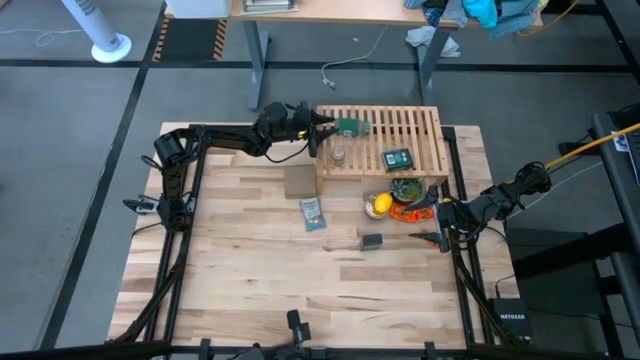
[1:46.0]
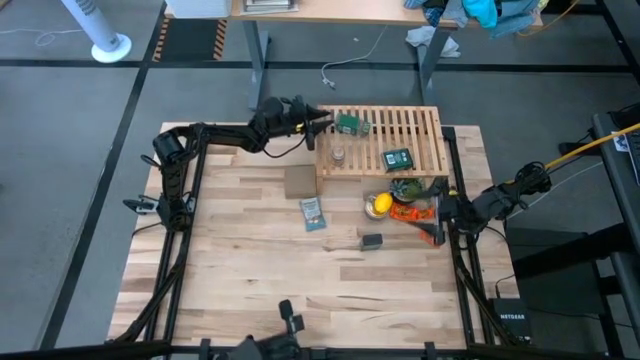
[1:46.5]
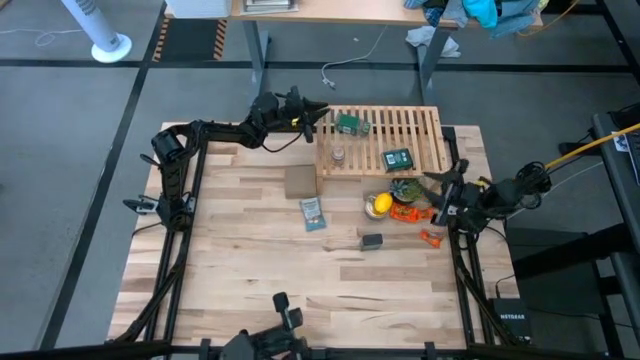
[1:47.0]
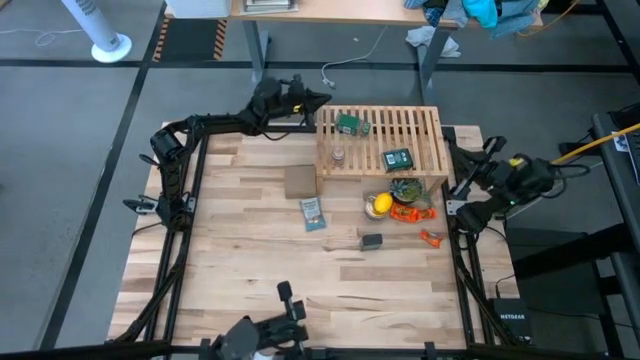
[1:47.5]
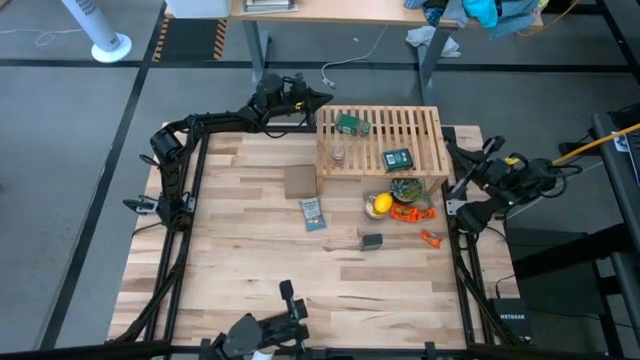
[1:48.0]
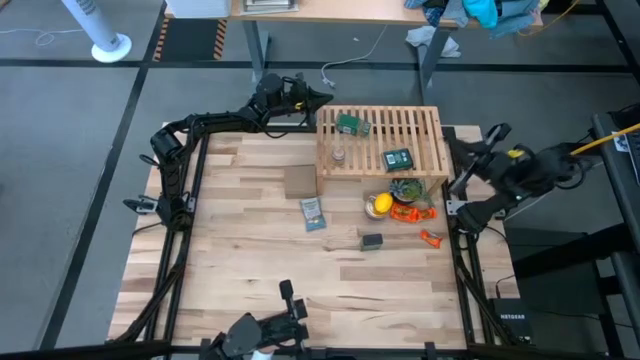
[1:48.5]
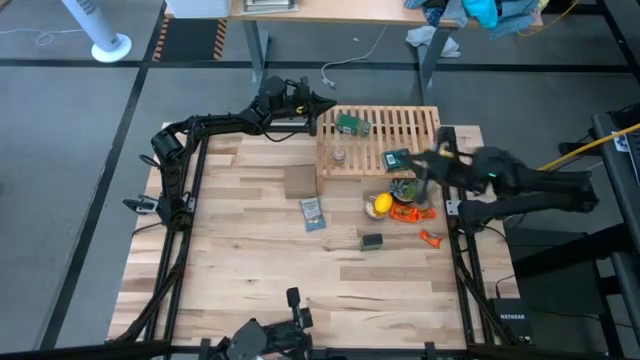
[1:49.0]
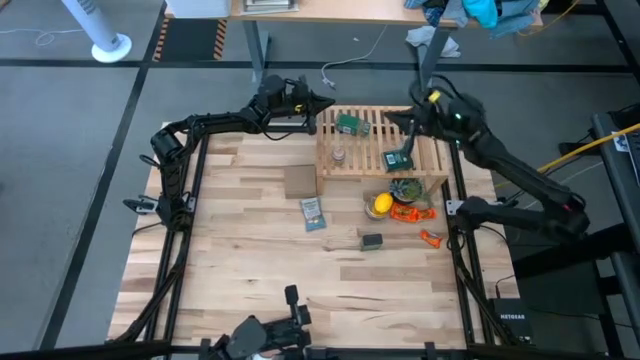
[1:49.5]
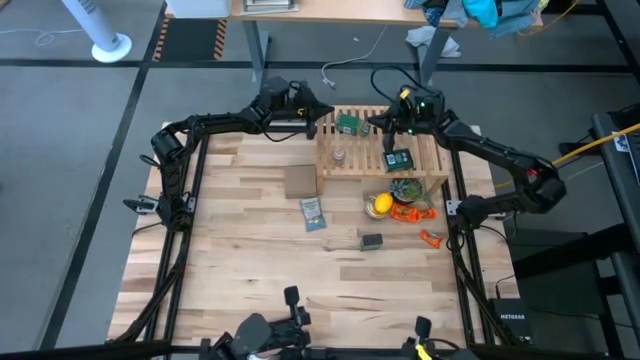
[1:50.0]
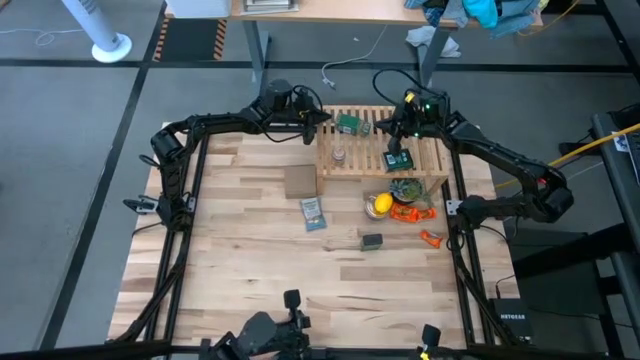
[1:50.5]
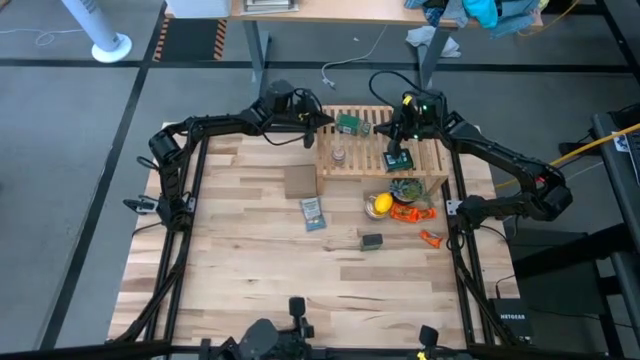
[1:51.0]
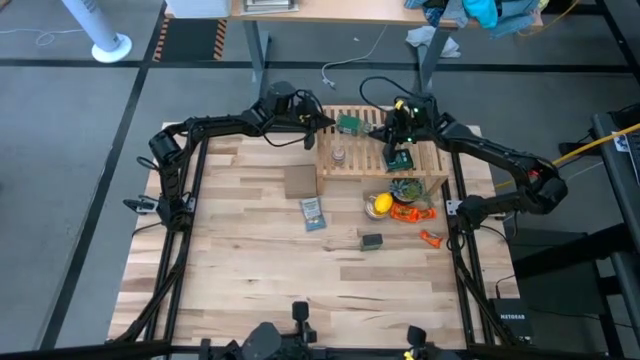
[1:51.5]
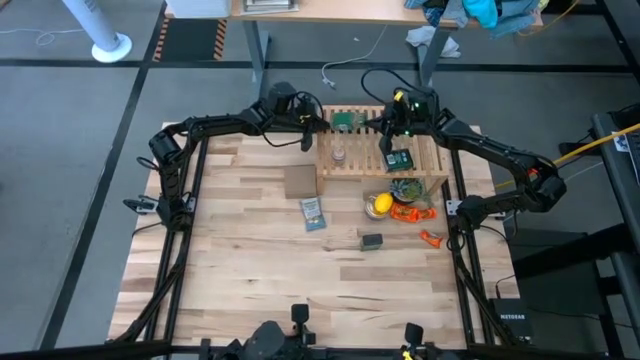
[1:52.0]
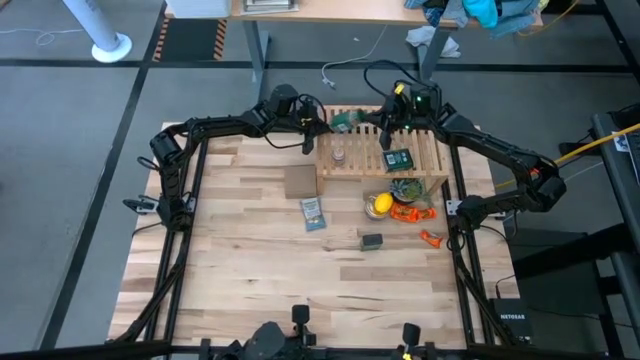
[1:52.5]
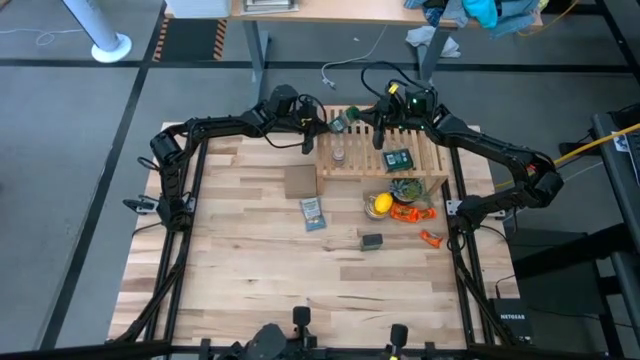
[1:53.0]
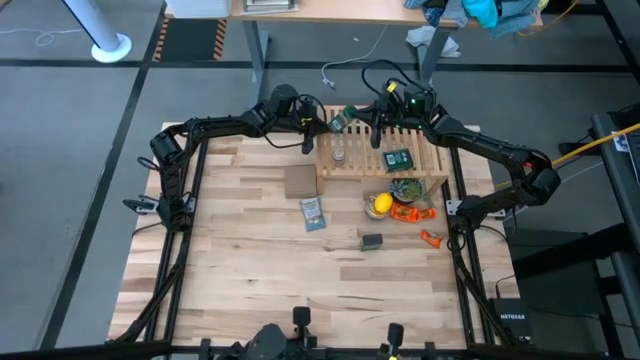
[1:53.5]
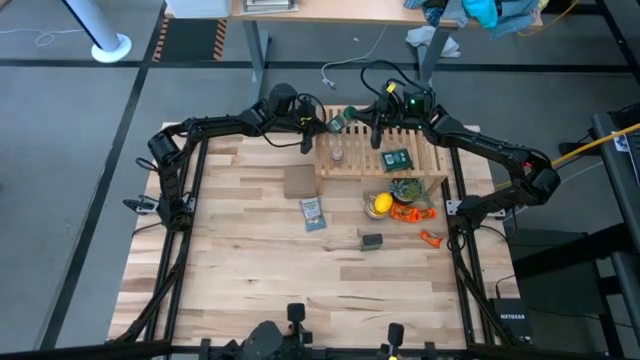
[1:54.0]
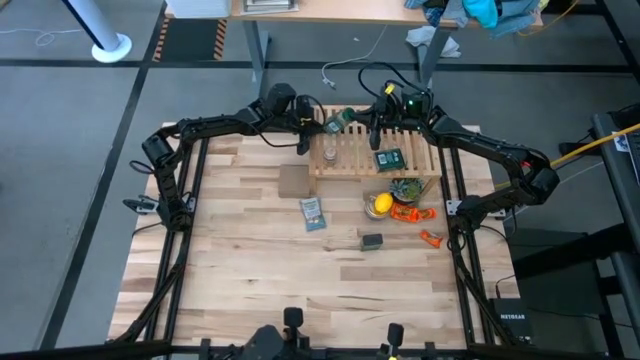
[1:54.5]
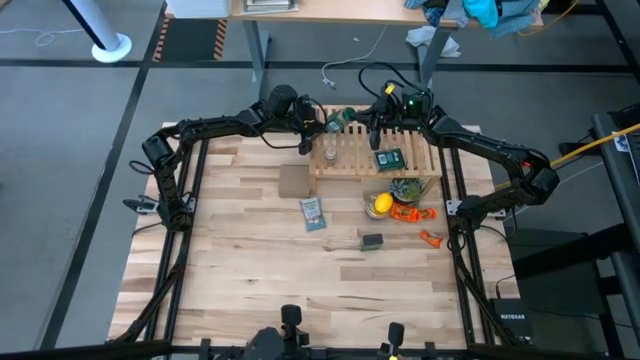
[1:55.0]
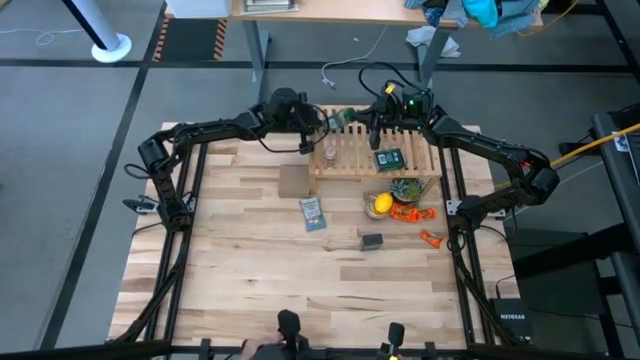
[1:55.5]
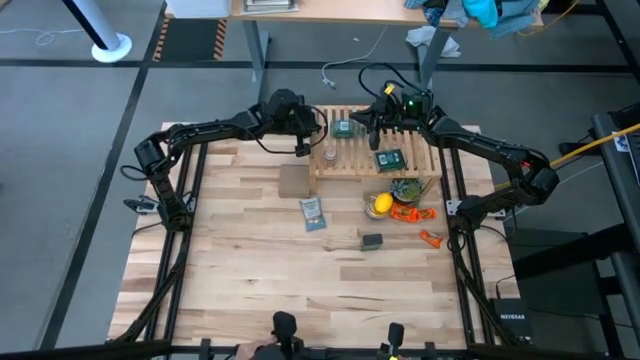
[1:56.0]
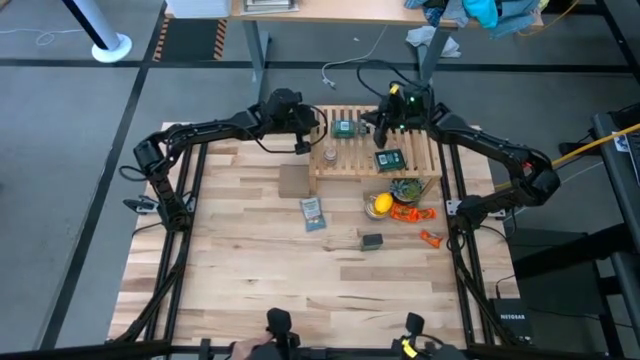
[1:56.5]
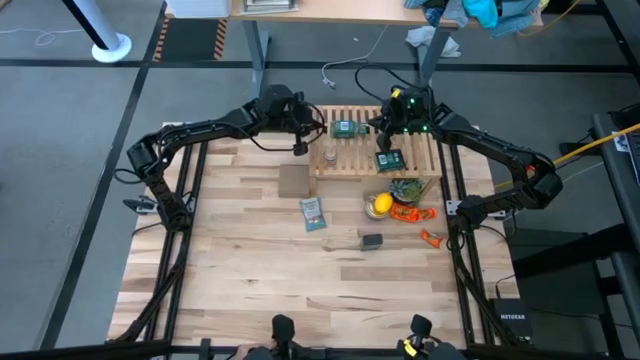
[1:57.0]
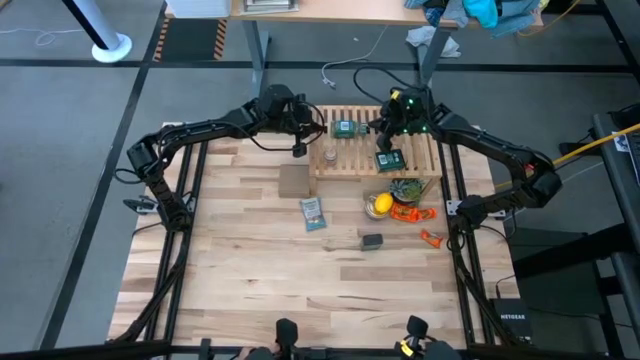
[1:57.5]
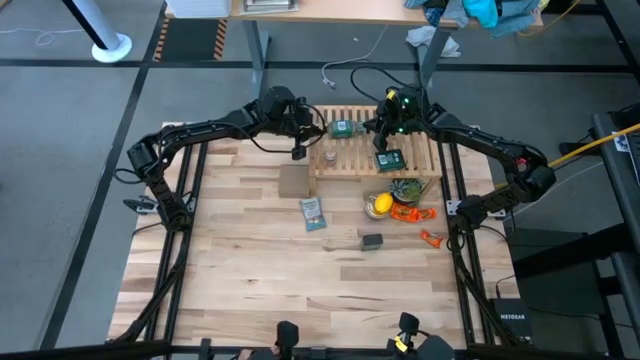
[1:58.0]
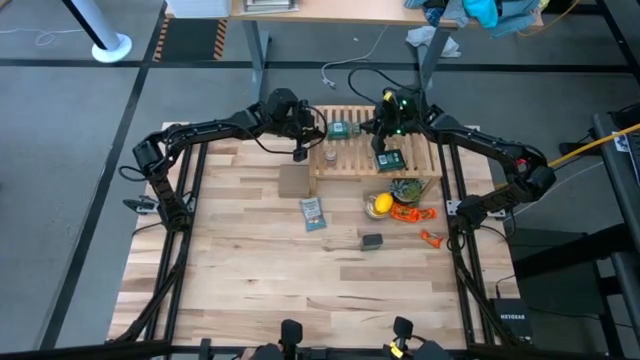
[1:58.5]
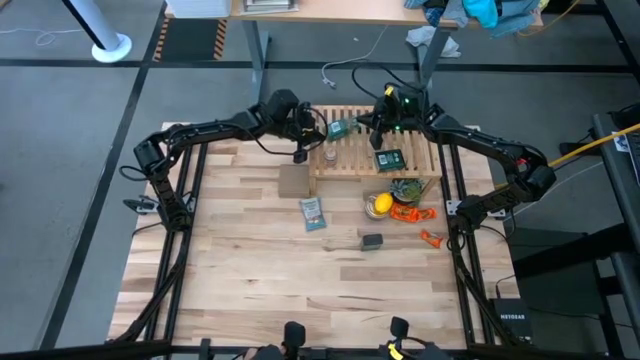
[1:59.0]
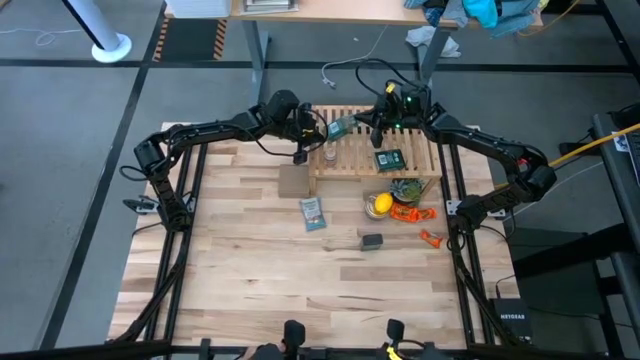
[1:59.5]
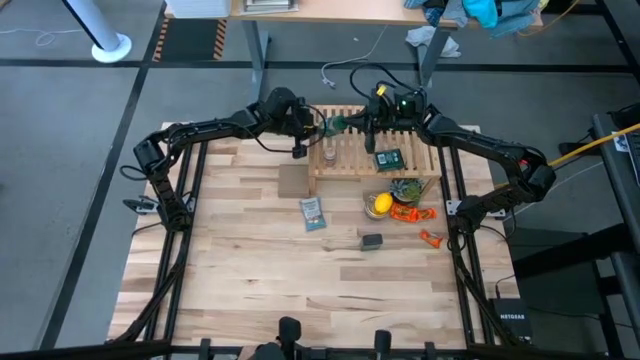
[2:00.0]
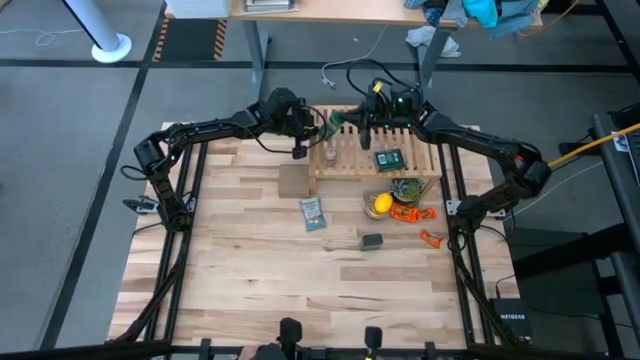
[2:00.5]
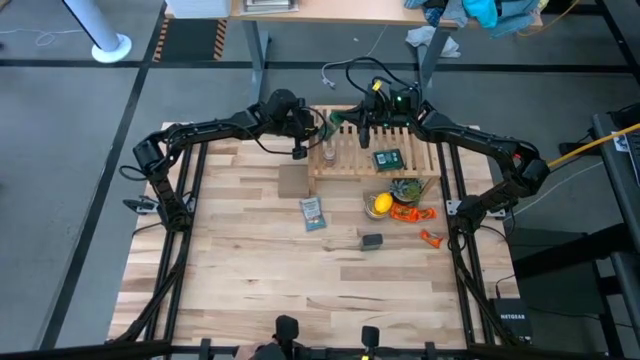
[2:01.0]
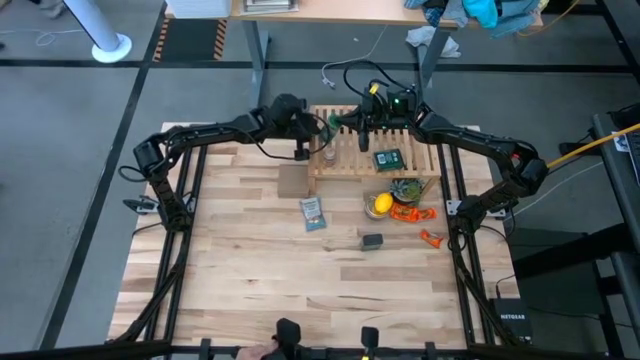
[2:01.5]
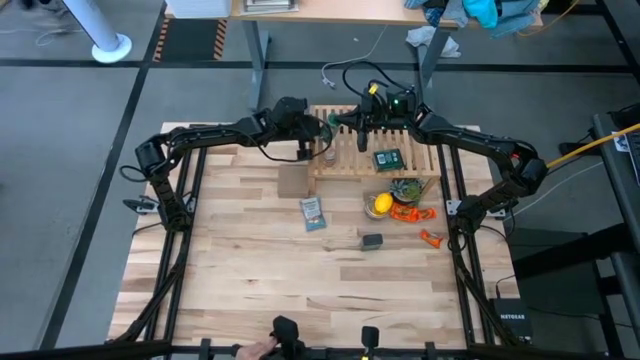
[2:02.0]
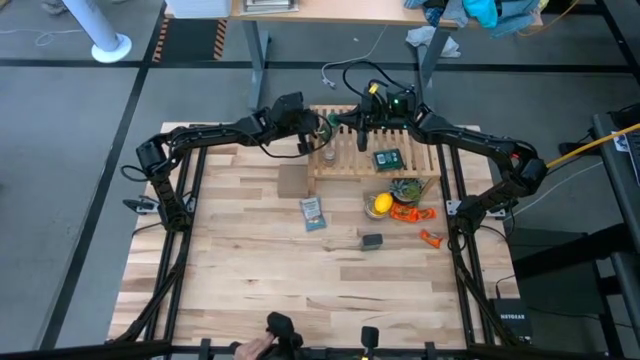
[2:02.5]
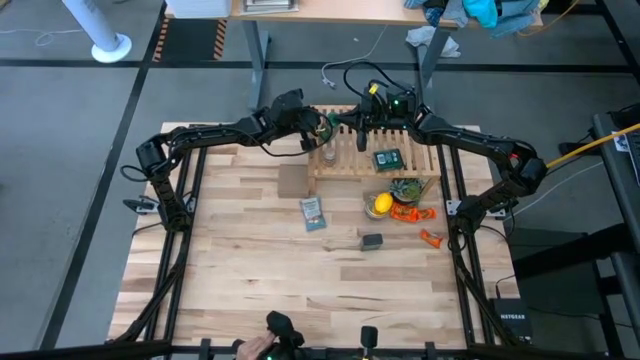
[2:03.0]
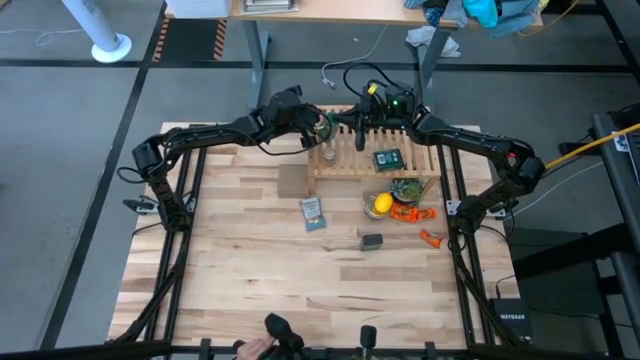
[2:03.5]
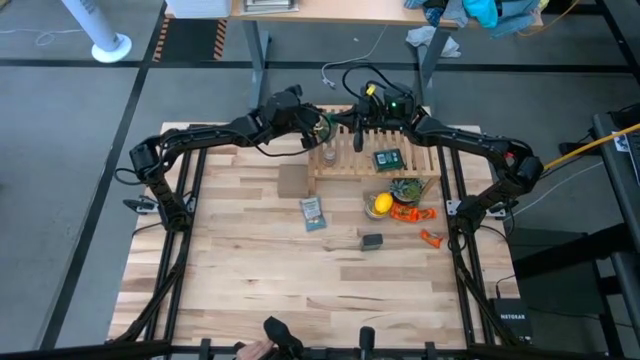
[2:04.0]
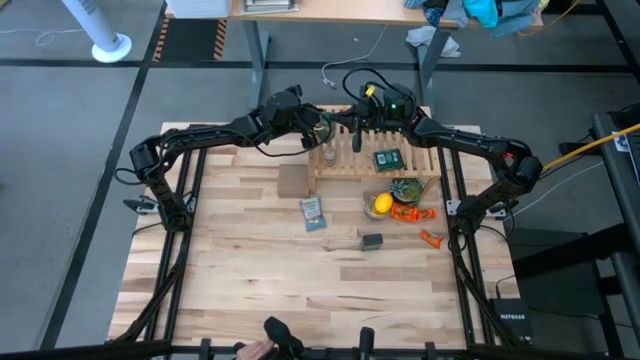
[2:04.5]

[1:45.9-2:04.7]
Task: Shelf spices
Put the green seasoning bottle on the shelf

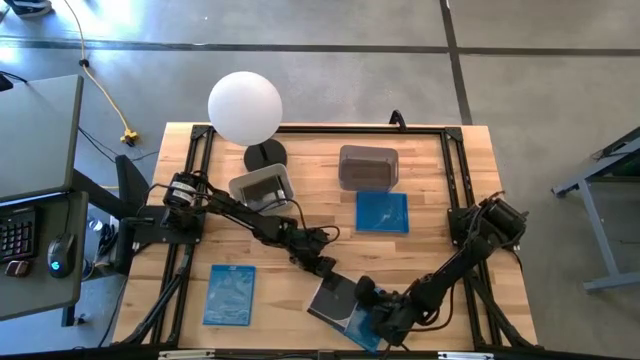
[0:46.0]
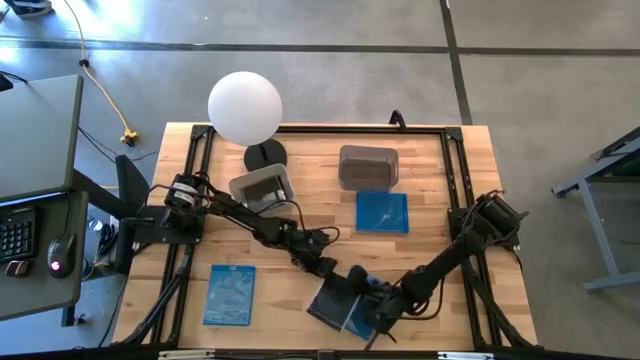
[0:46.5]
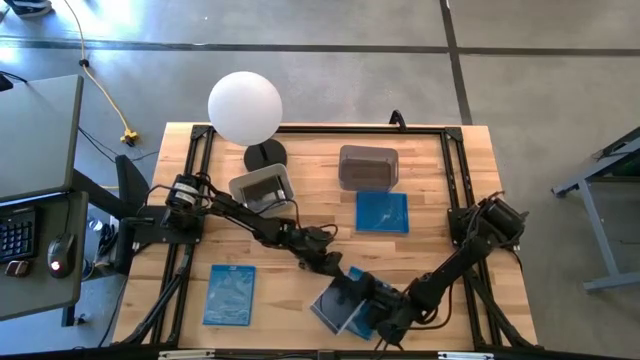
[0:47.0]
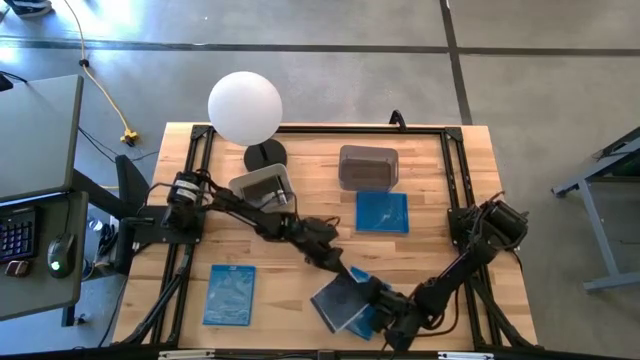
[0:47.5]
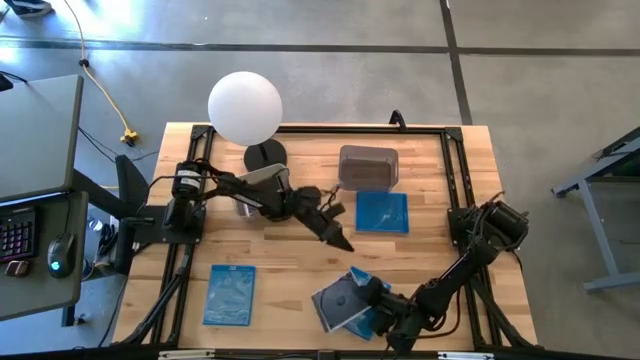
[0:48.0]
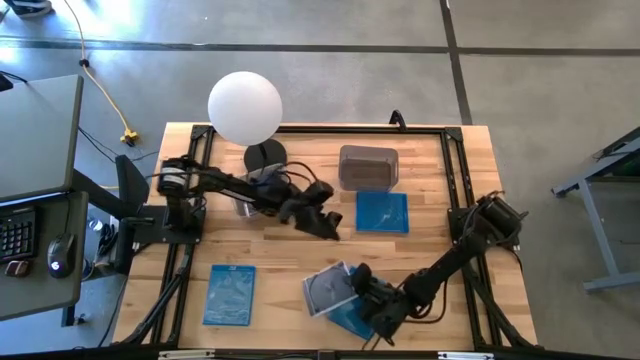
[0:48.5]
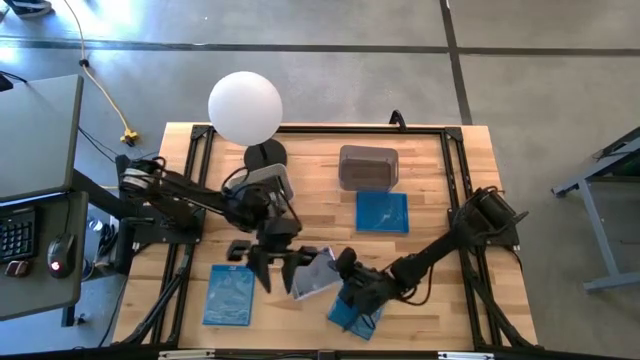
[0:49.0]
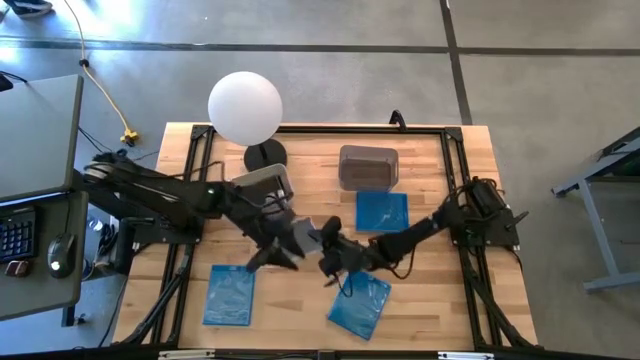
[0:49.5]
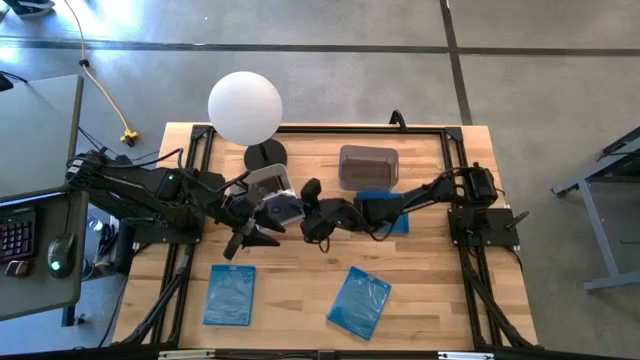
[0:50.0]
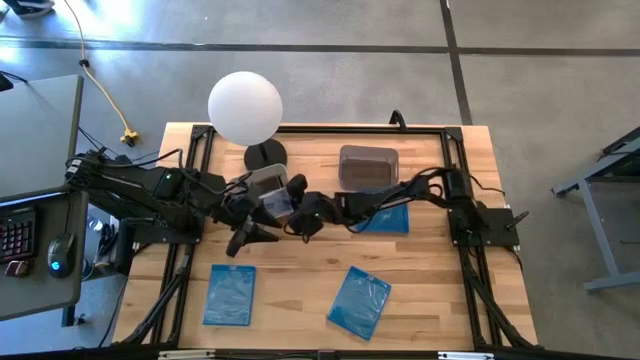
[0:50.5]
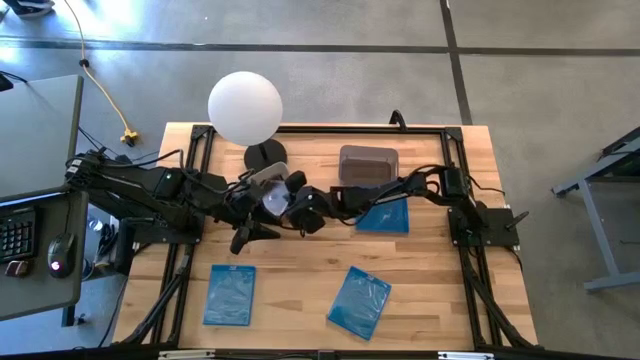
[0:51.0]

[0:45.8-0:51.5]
Task: Pick & place jewel cases by type
Put the black CD case into the gray bin
